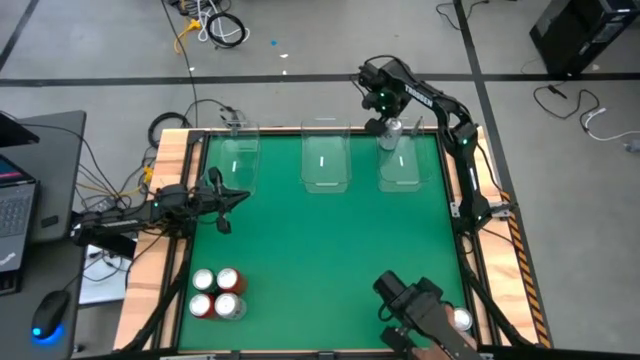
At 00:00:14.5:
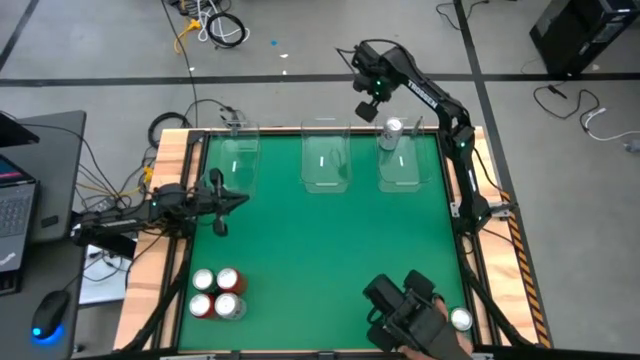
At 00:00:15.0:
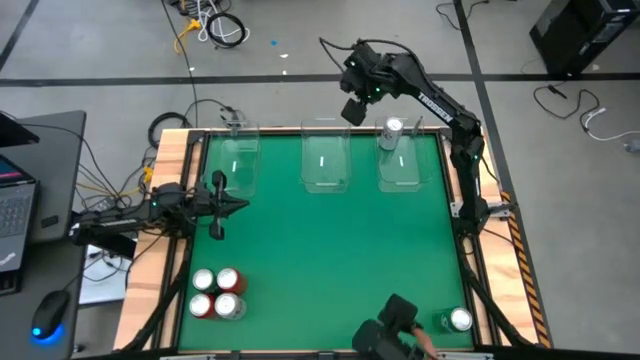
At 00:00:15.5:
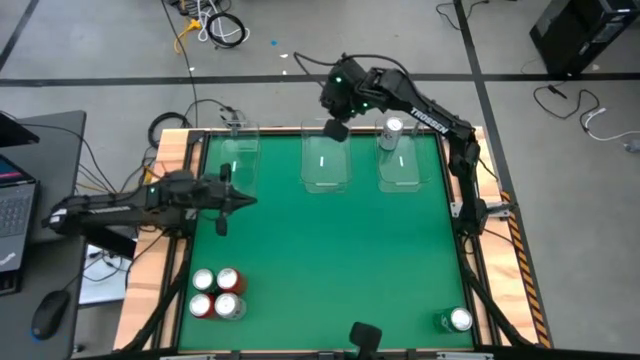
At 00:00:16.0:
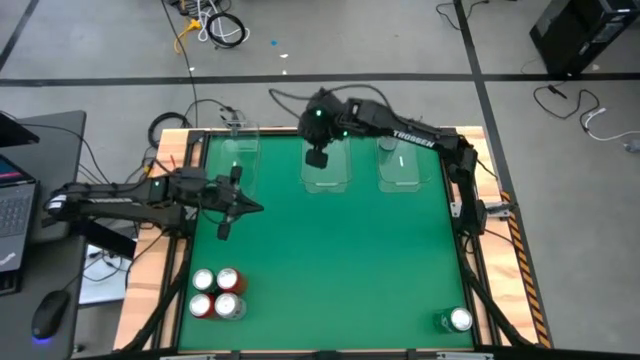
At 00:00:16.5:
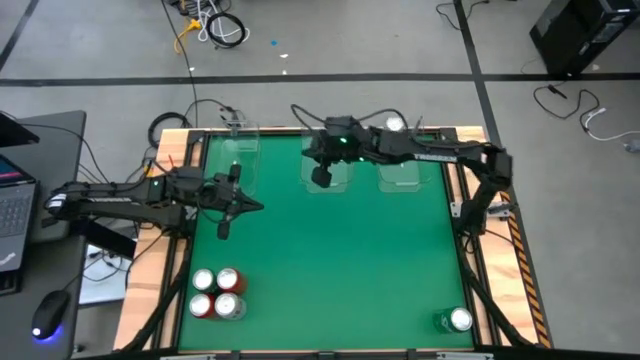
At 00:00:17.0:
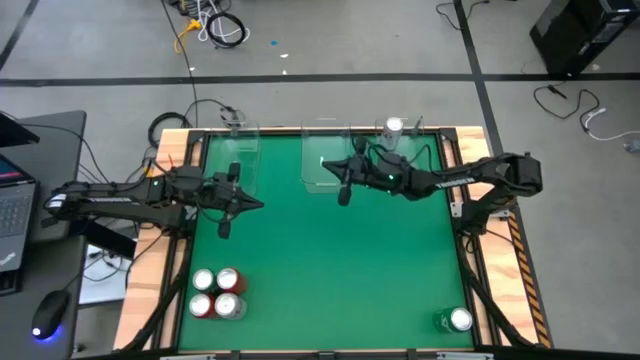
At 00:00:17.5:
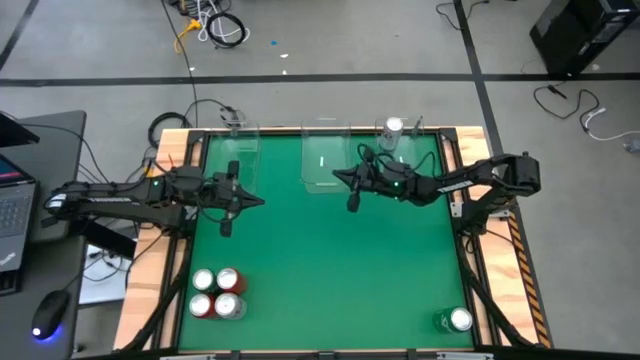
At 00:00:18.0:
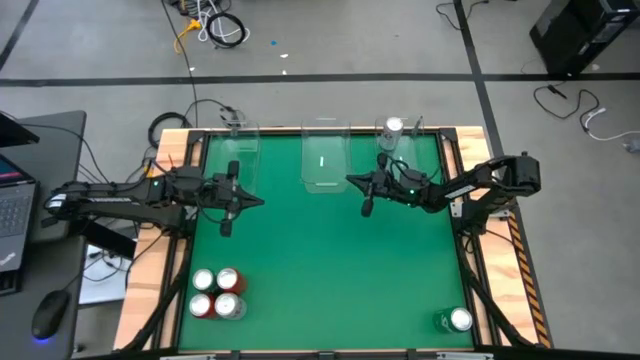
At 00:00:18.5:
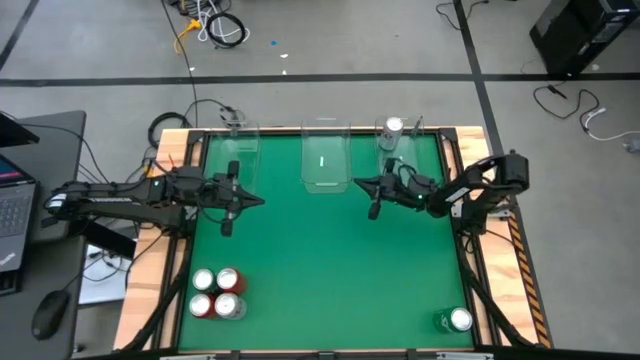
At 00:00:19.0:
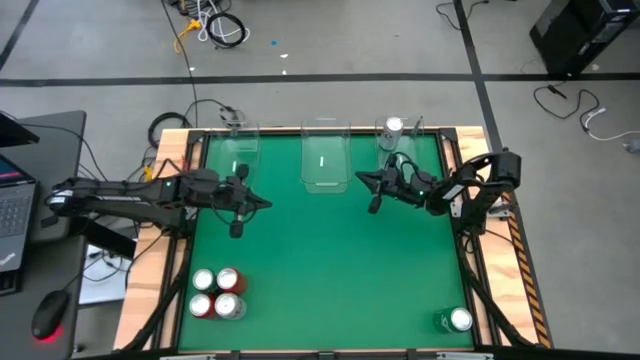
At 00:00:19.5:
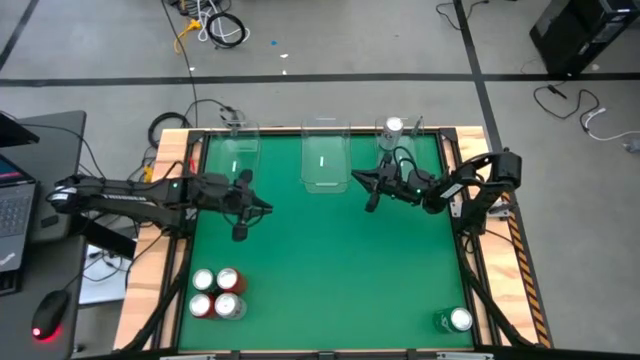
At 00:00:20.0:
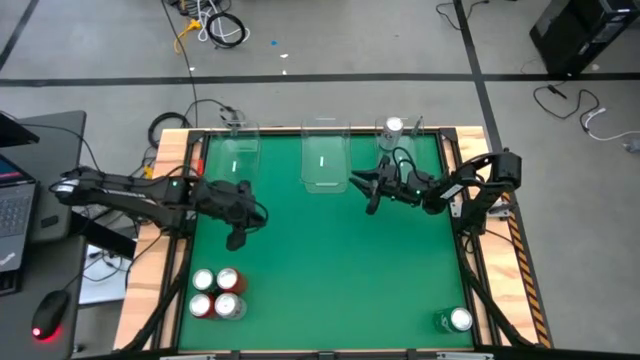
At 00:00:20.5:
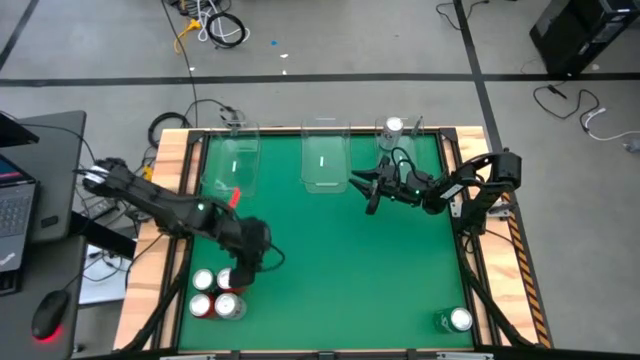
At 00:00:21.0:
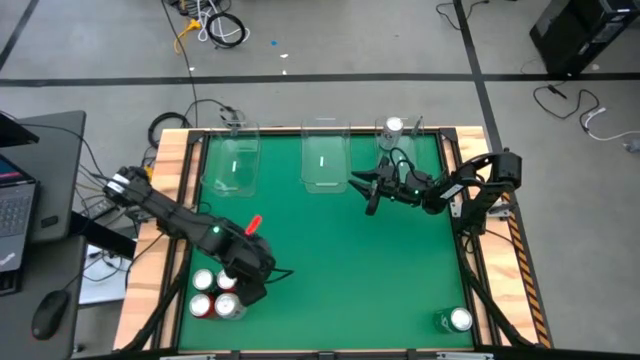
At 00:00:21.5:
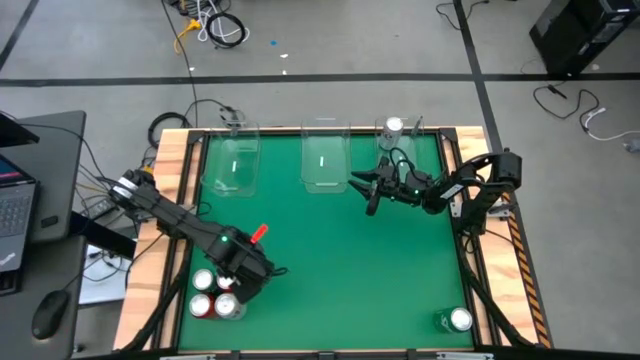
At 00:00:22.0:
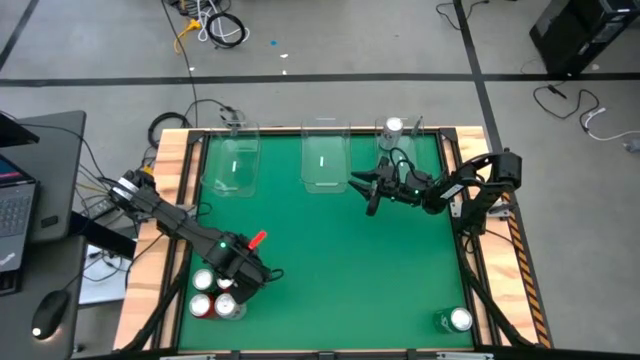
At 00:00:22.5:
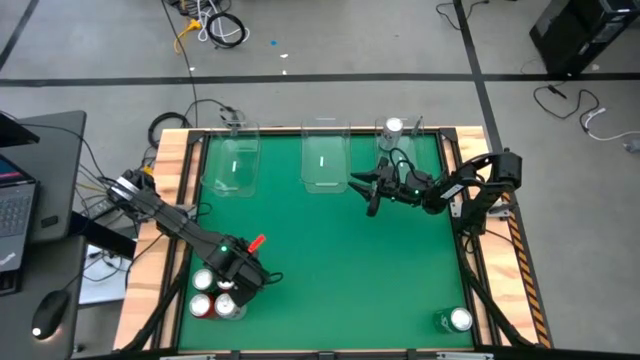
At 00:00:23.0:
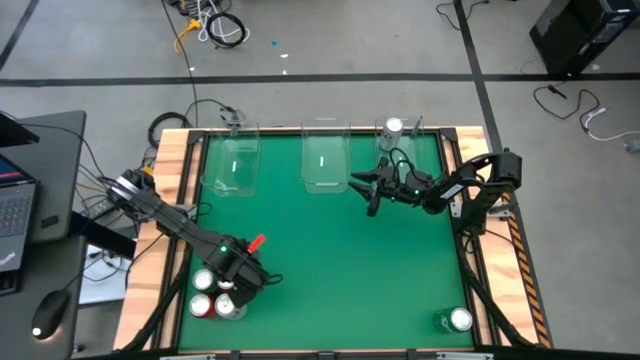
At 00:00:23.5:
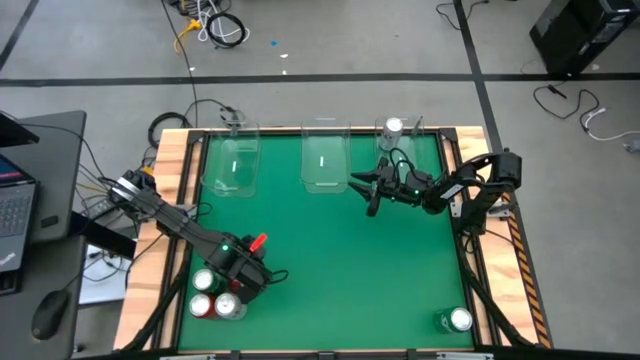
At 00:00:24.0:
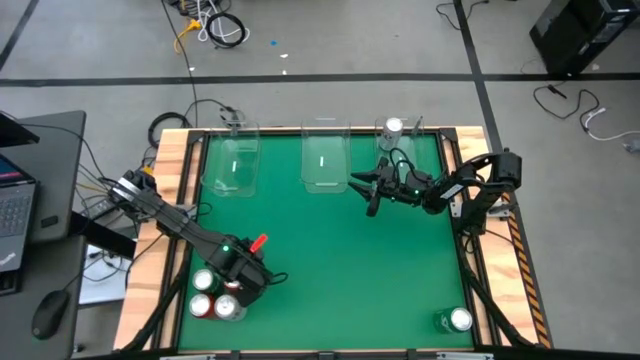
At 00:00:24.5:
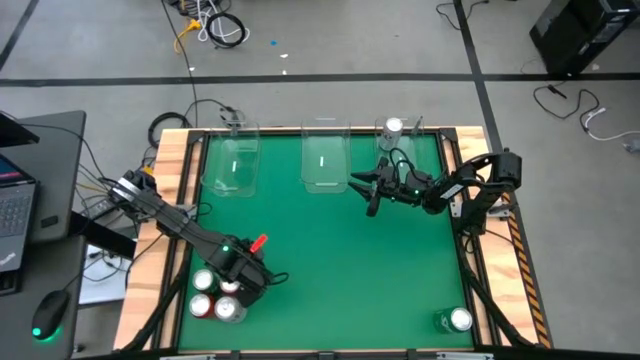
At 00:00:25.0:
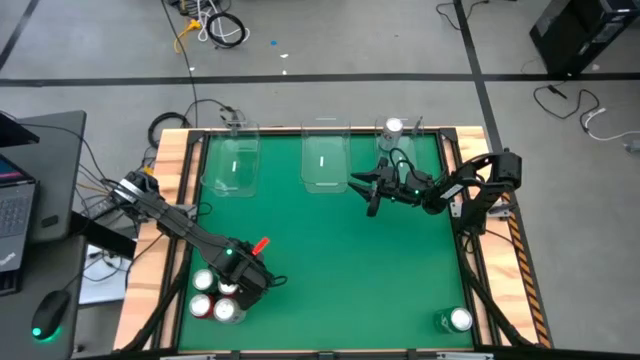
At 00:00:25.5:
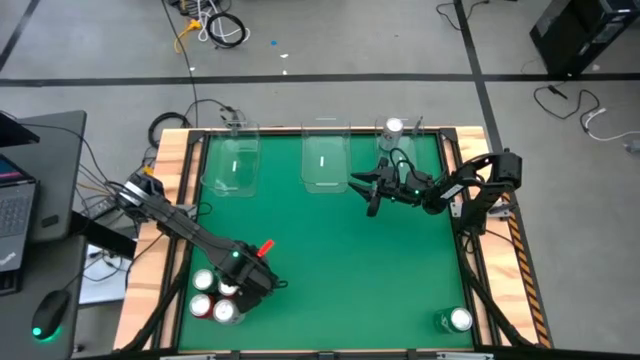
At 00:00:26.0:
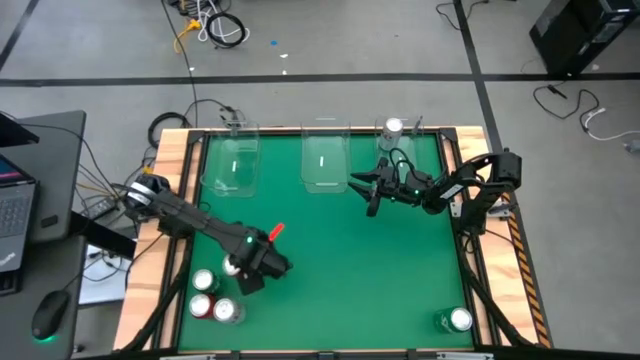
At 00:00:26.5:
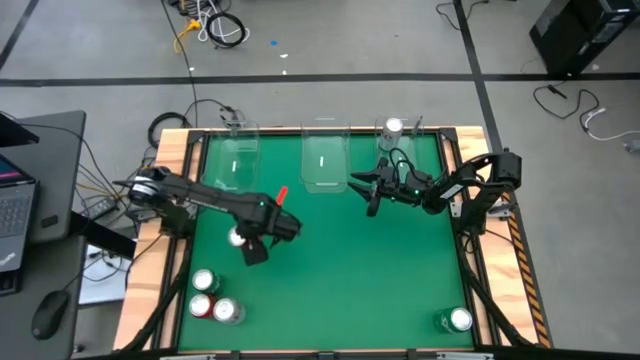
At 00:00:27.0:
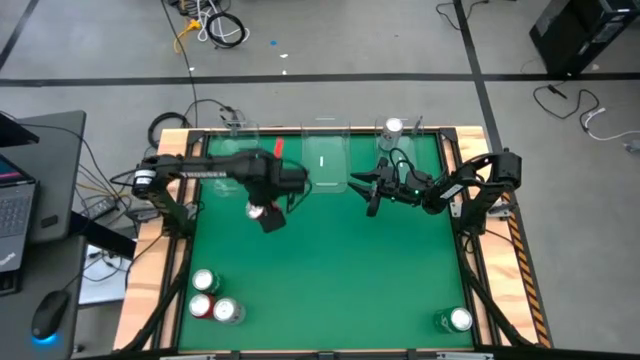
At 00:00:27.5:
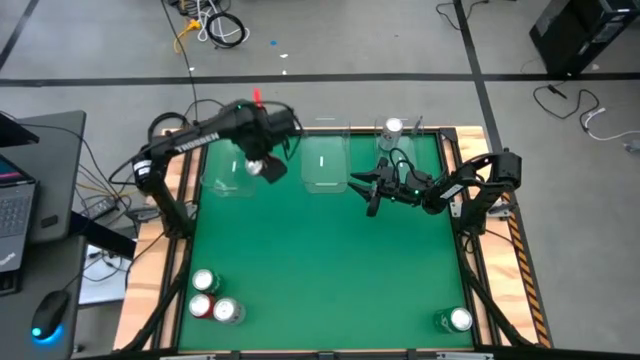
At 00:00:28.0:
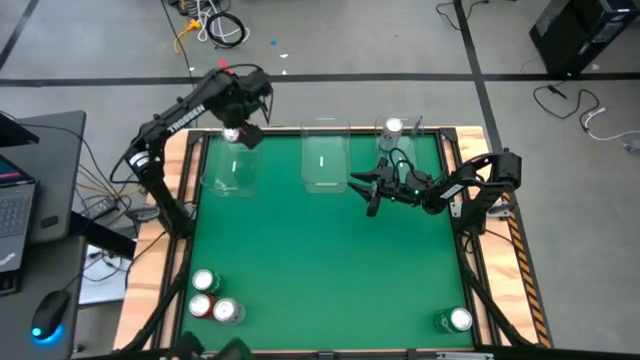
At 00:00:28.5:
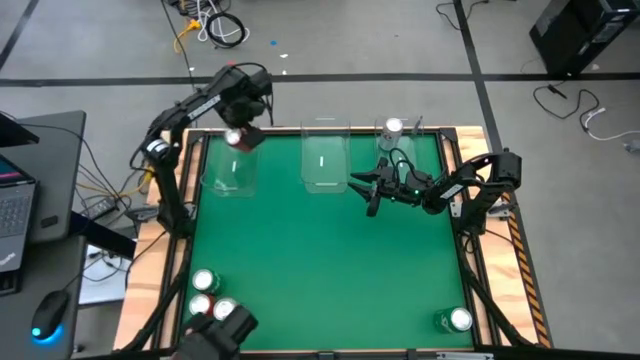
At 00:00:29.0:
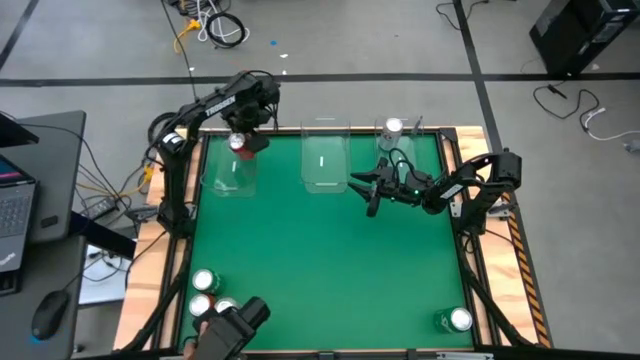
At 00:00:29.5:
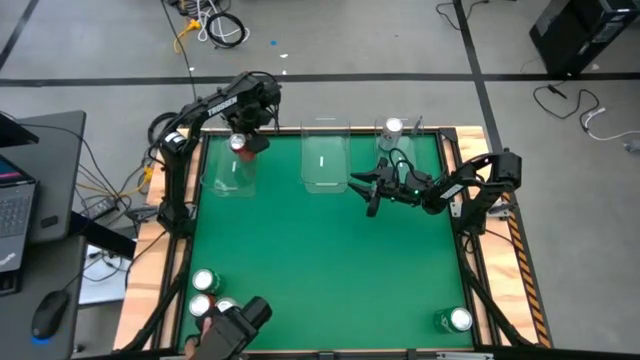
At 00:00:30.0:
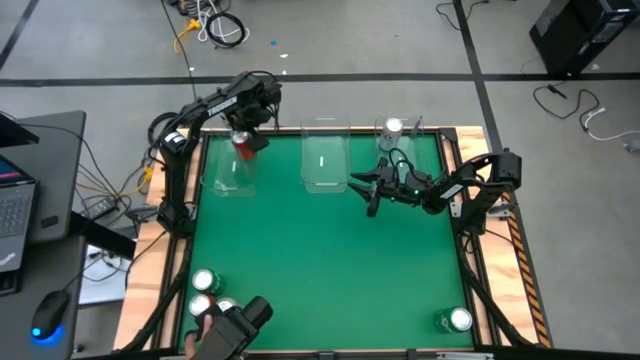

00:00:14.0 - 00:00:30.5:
Task: Sort soda cans
Put the top red soda can into the left transparent bin
